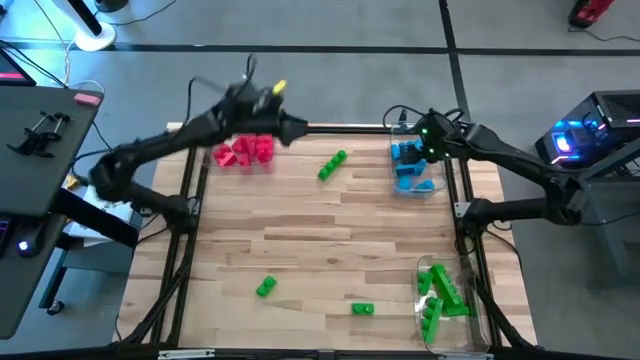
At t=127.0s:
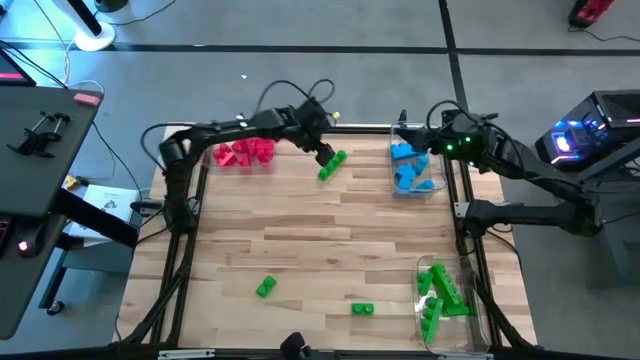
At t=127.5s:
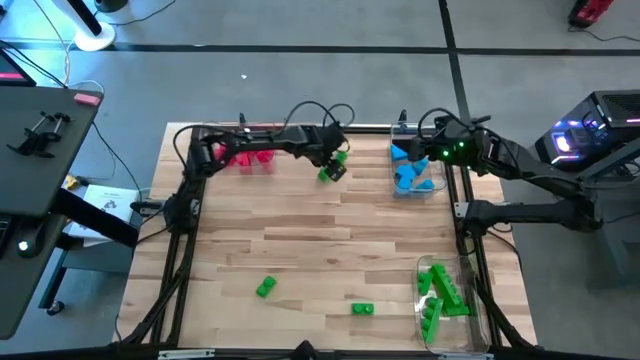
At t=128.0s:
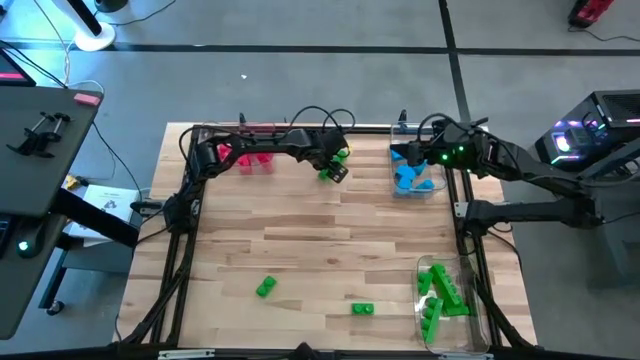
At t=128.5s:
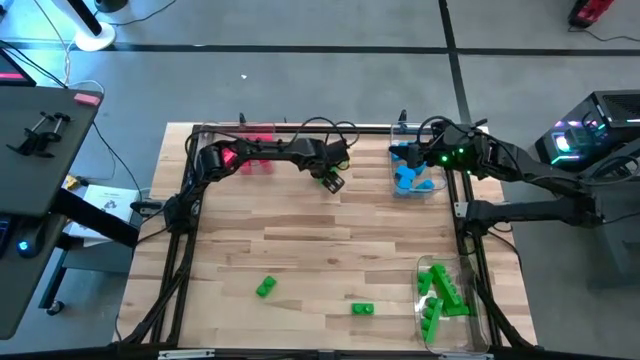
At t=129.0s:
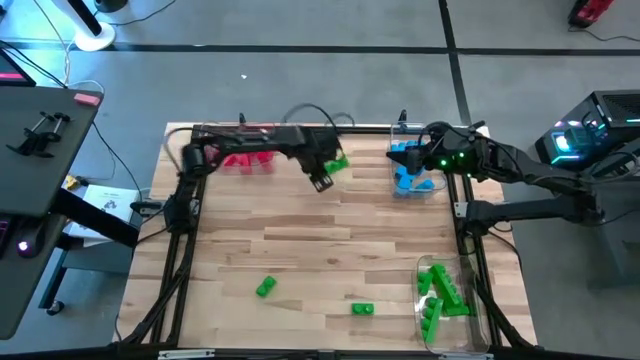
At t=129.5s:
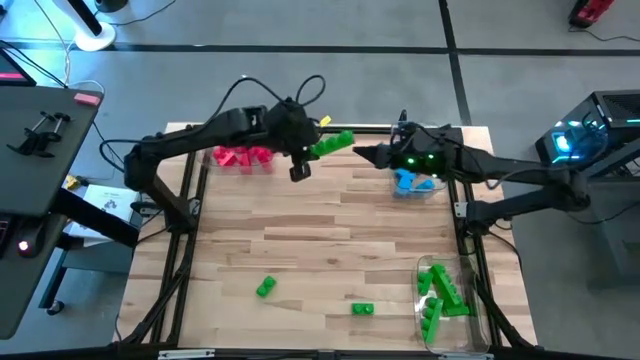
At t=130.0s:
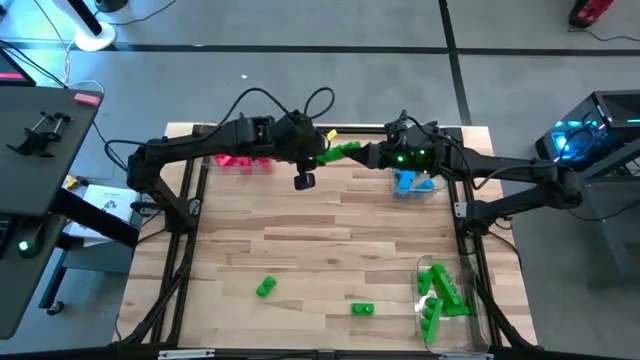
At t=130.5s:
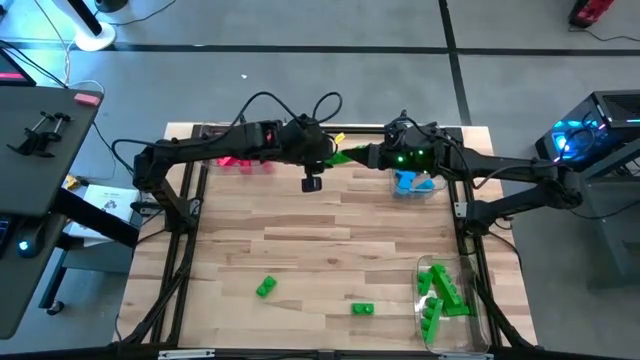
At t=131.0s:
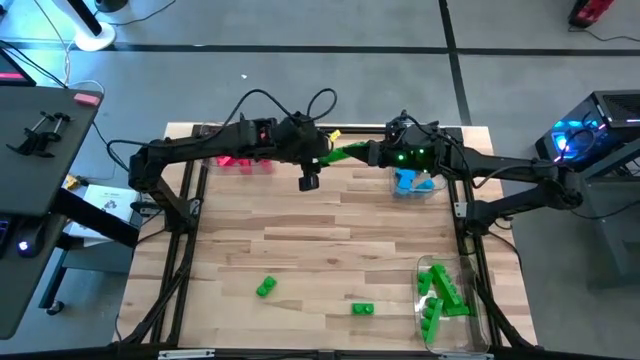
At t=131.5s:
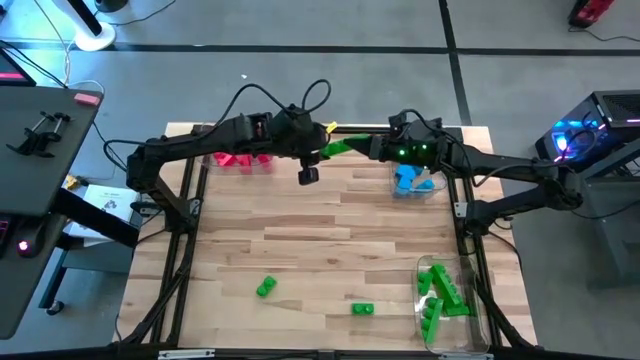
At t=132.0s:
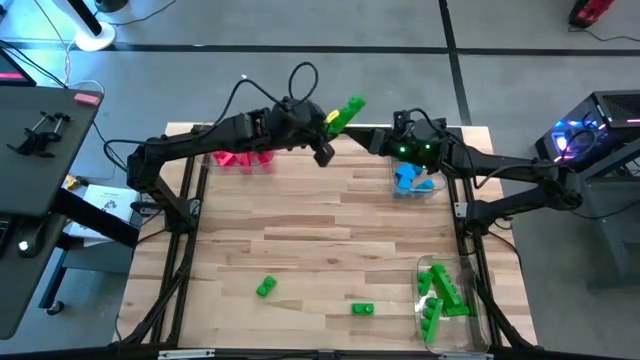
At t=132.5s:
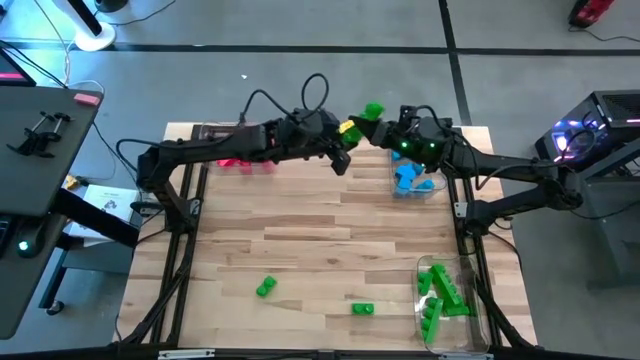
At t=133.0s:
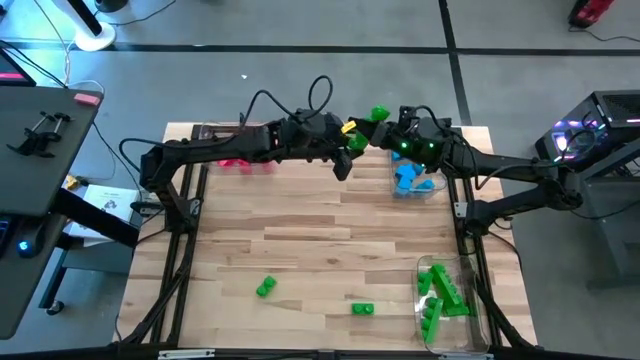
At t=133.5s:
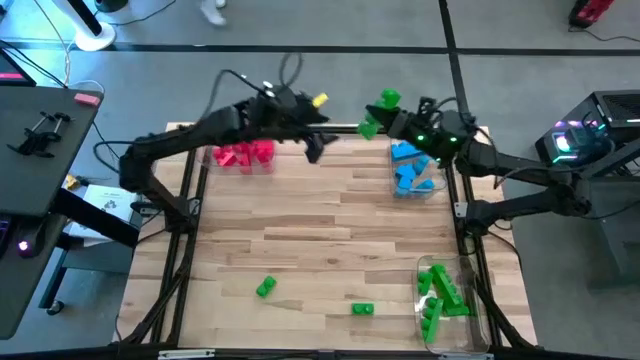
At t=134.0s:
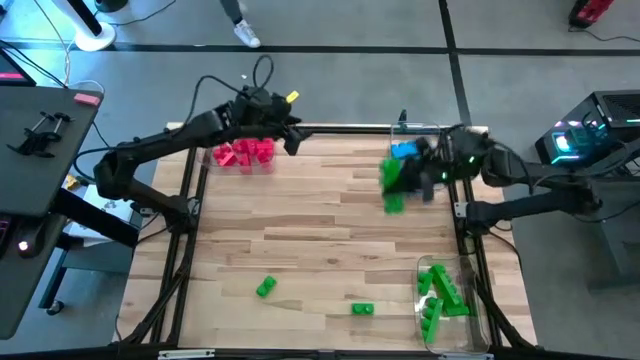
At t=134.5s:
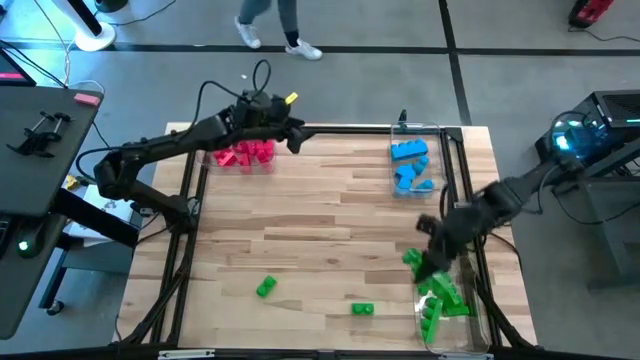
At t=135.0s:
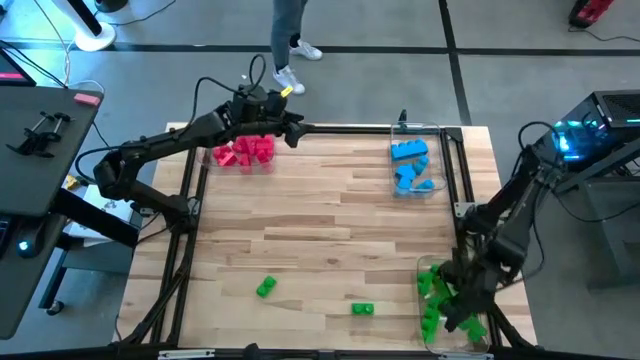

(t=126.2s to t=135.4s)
Task: Sort blocks
Put the green game piece into the bottom right transparent bin

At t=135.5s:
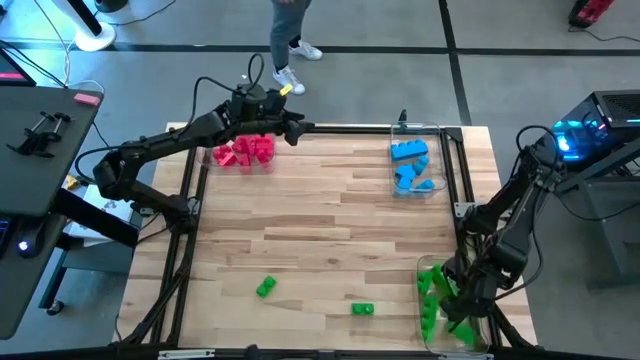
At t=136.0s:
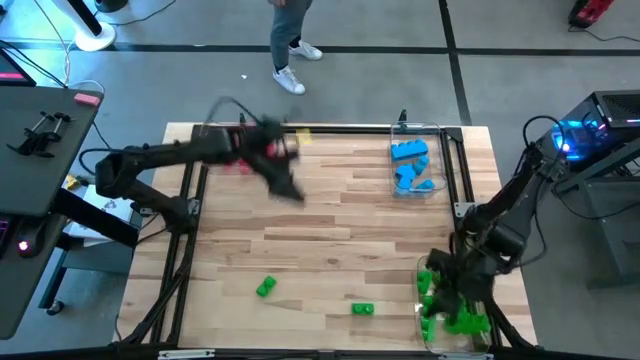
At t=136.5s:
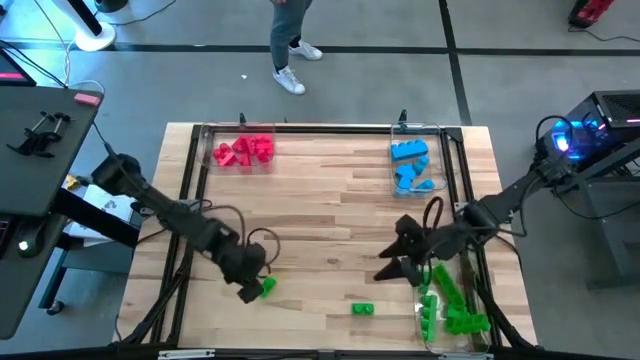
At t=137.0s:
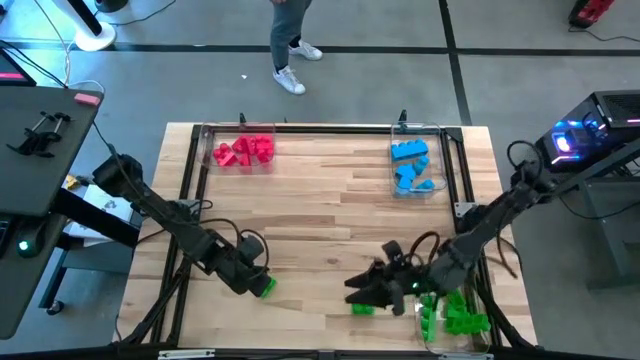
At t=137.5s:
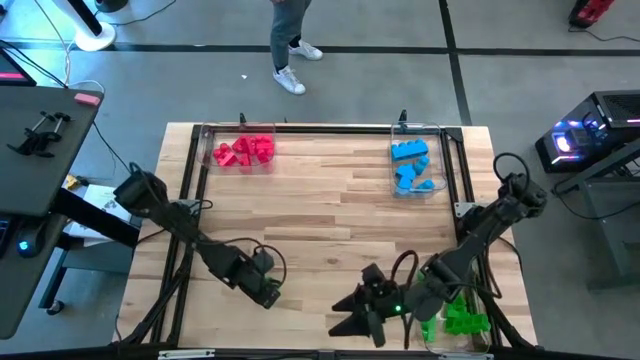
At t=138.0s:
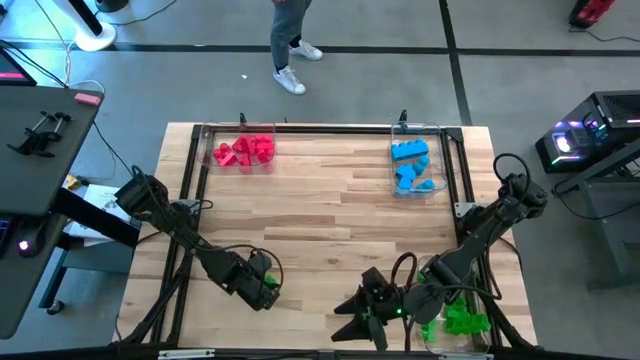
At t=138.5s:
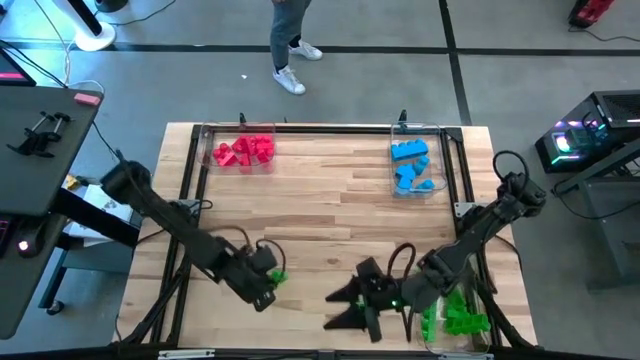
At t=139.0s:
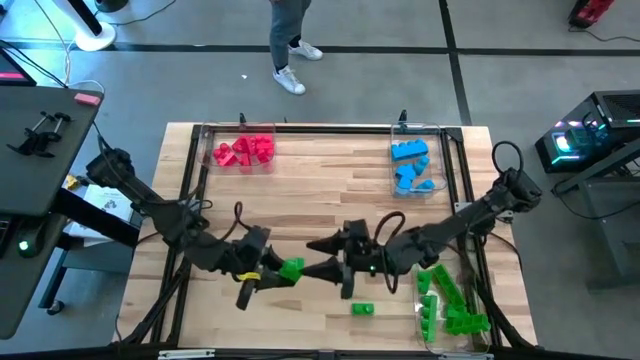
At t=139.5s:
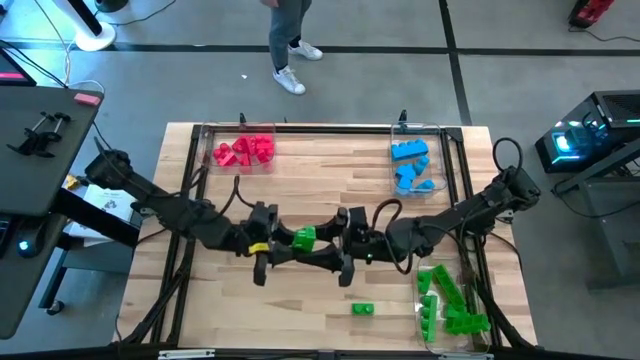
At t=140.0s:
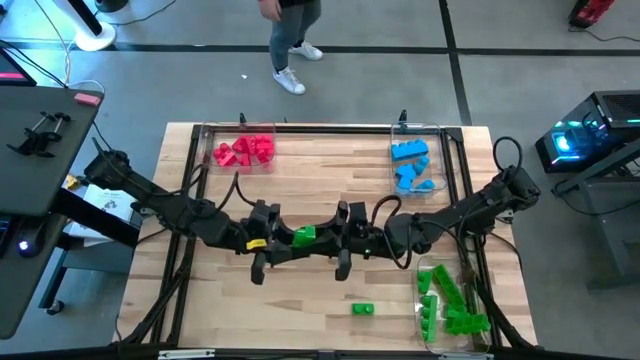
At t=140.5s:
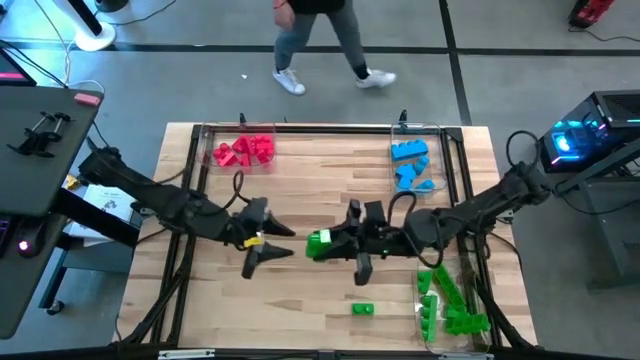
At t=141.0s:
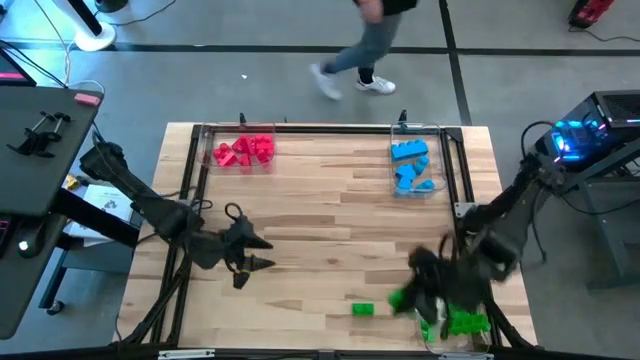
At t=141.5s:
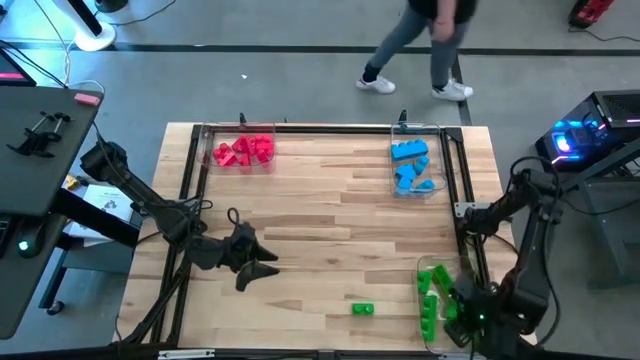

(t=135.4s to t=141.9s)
Put the green game piece into the bottom right transparent bin

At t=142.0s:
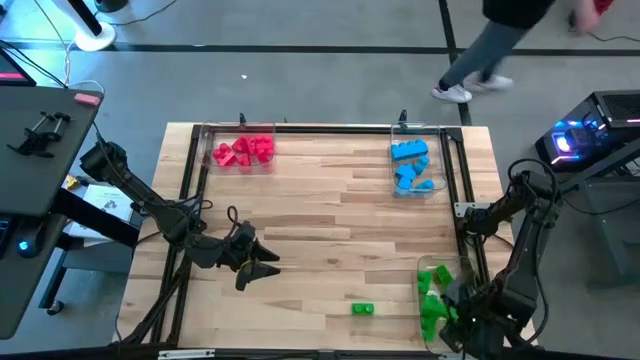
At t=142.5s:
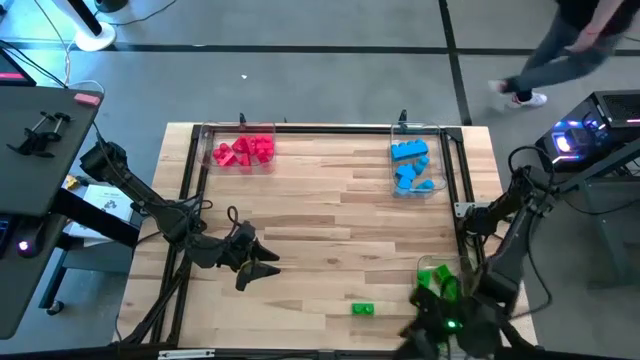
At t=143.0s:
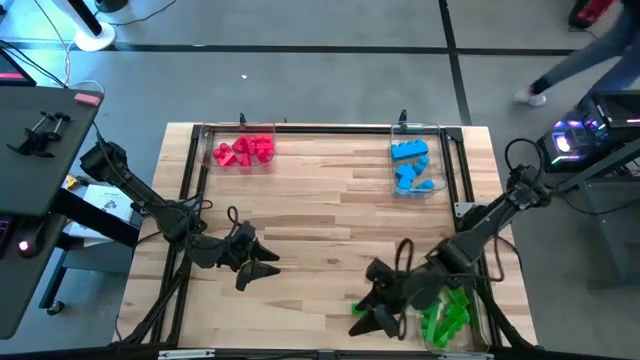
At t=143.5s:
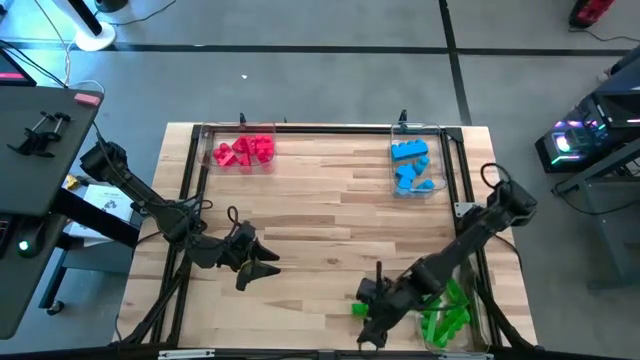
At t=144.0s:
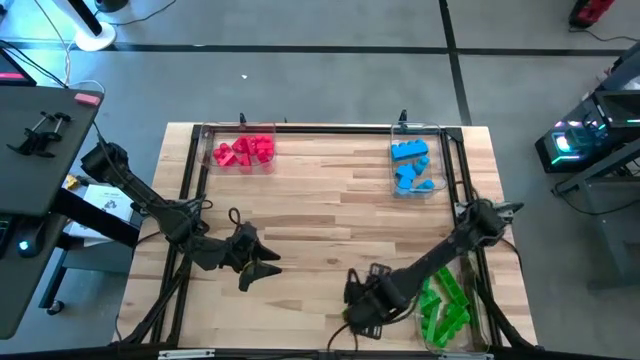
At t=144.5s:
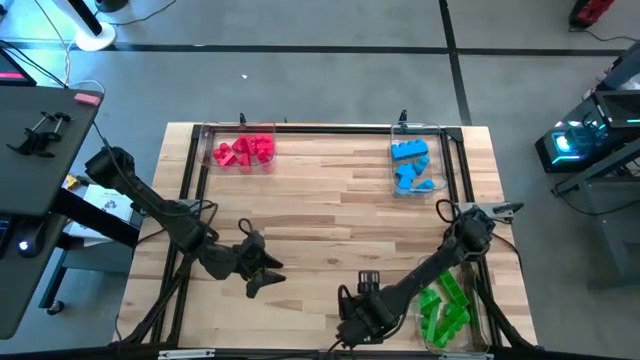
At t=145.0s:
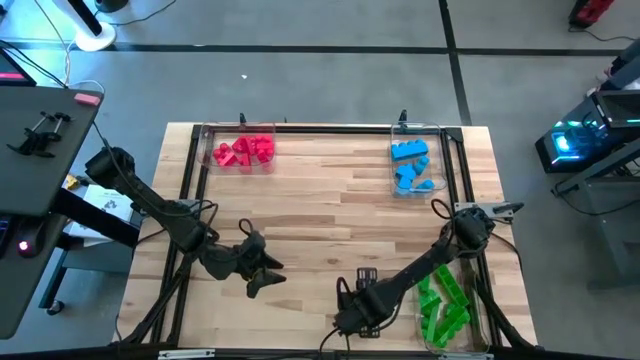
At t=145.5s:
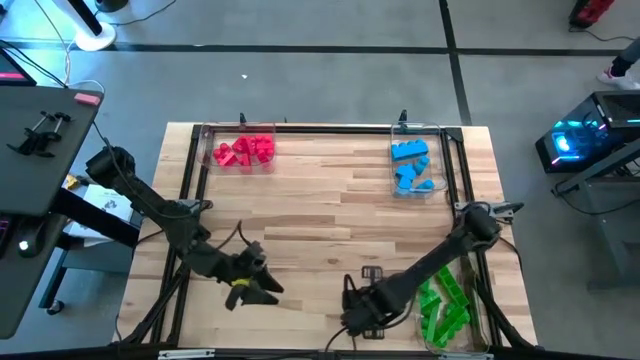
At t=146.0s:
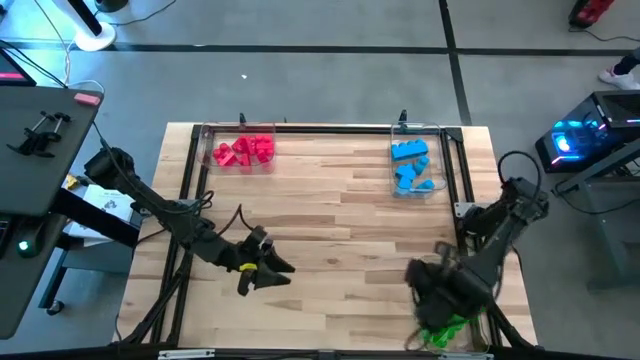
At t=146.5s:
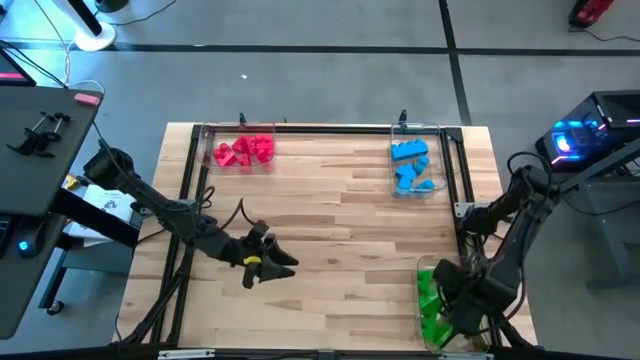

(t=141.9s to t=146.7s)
Put the green game piece into the bottom right transparent bin
